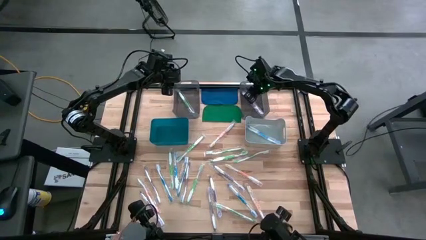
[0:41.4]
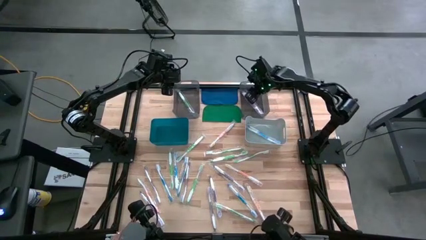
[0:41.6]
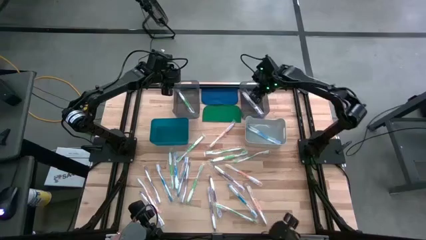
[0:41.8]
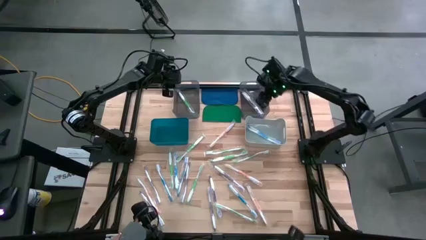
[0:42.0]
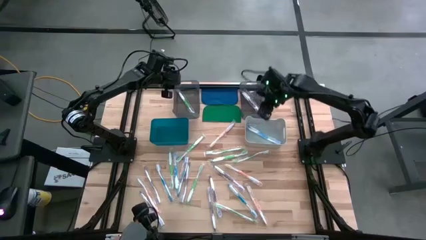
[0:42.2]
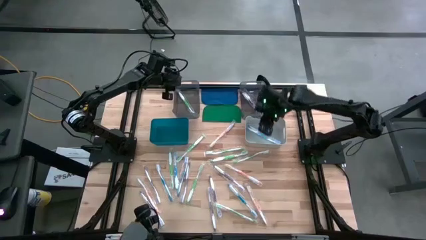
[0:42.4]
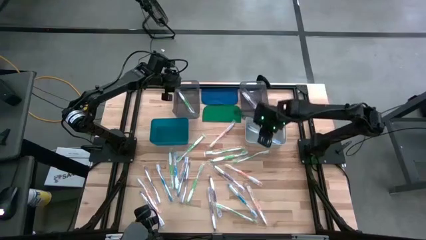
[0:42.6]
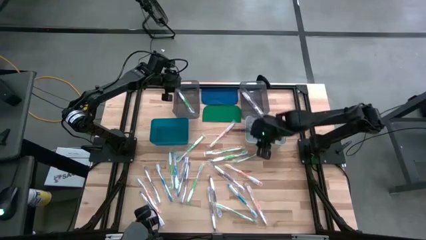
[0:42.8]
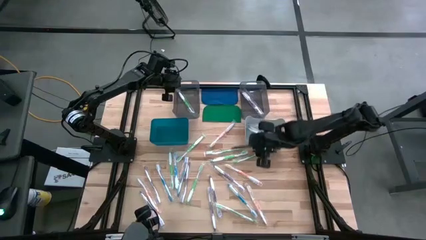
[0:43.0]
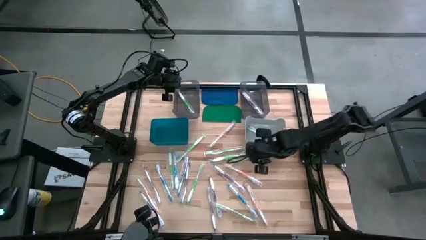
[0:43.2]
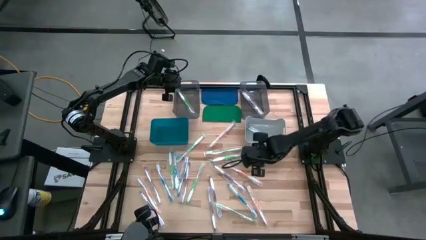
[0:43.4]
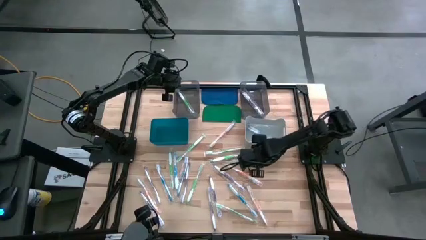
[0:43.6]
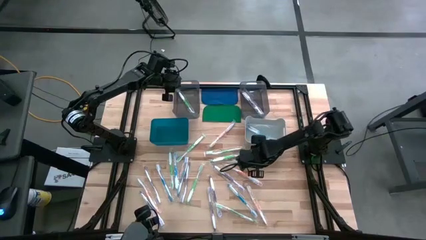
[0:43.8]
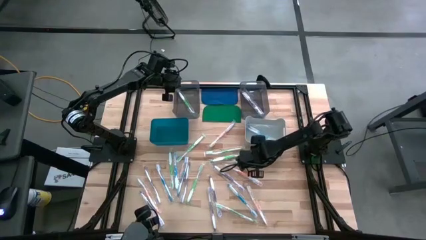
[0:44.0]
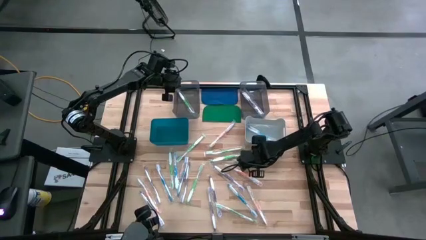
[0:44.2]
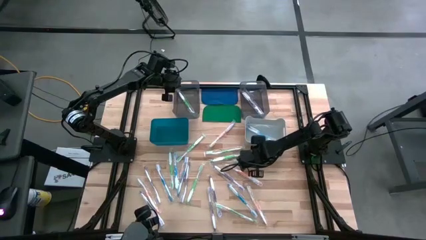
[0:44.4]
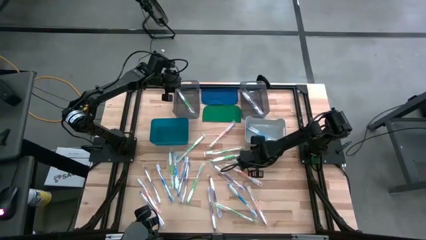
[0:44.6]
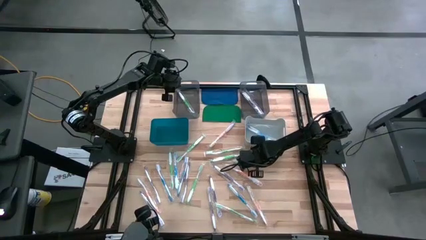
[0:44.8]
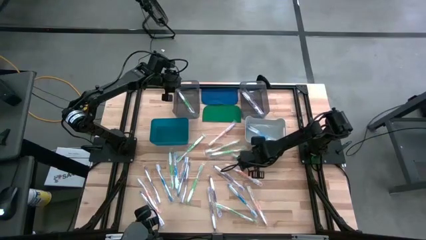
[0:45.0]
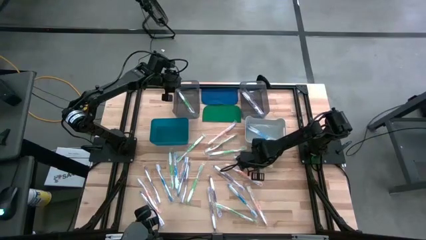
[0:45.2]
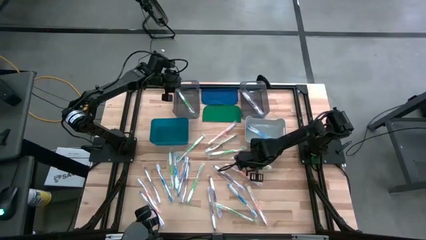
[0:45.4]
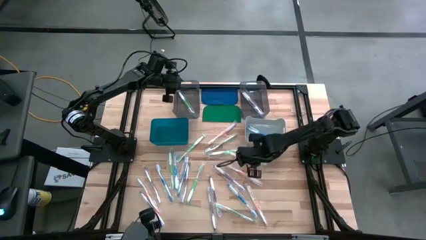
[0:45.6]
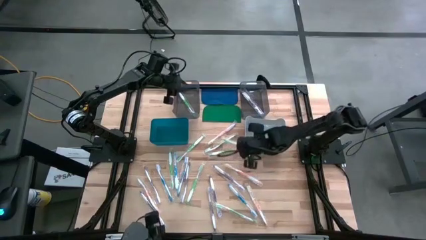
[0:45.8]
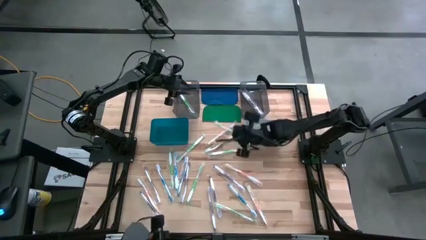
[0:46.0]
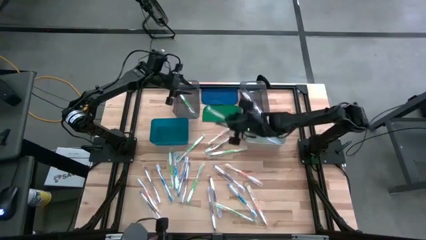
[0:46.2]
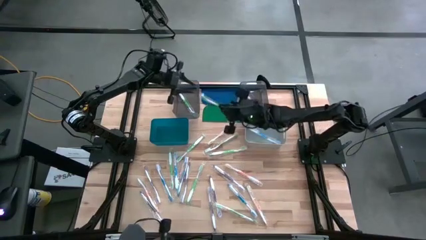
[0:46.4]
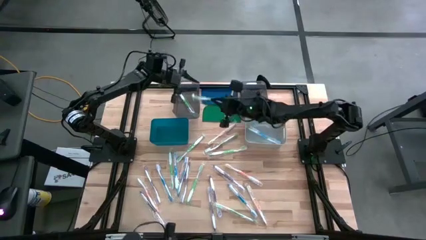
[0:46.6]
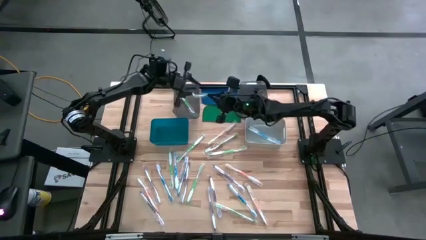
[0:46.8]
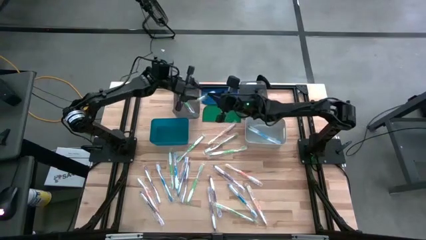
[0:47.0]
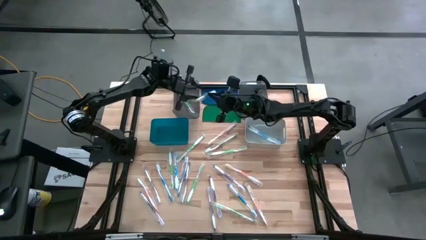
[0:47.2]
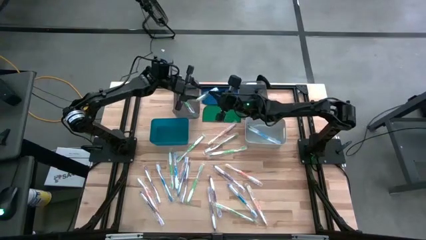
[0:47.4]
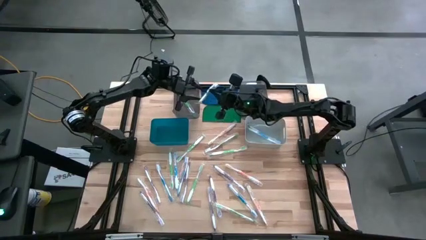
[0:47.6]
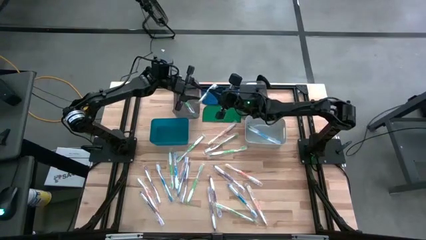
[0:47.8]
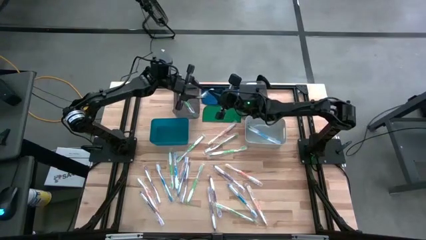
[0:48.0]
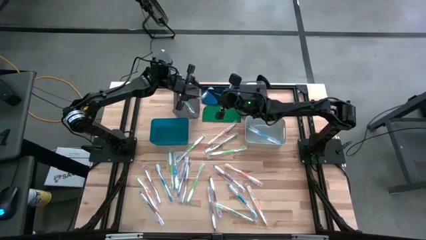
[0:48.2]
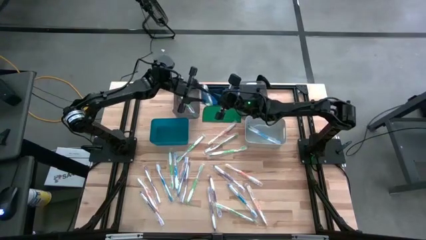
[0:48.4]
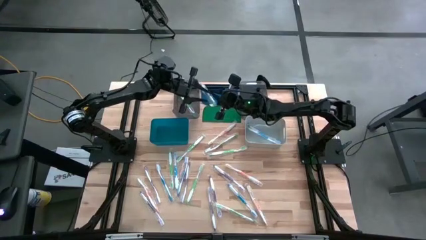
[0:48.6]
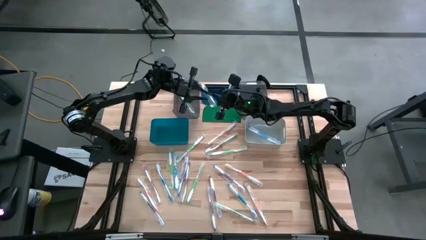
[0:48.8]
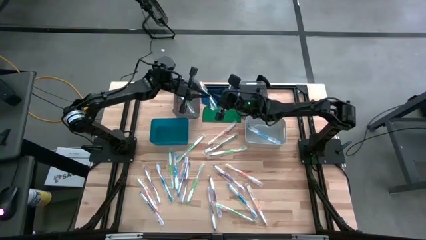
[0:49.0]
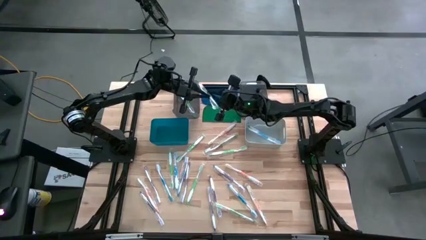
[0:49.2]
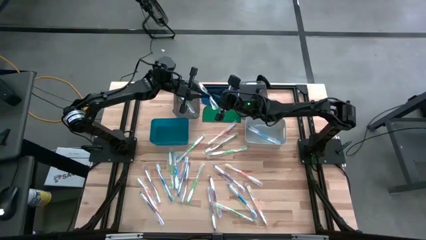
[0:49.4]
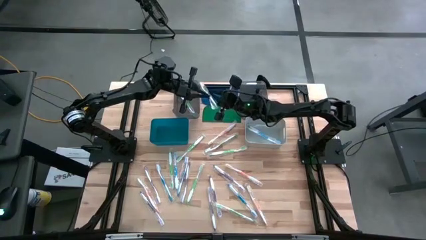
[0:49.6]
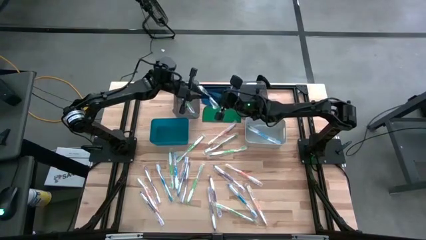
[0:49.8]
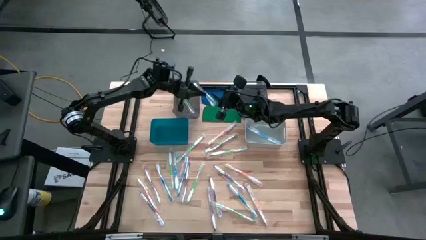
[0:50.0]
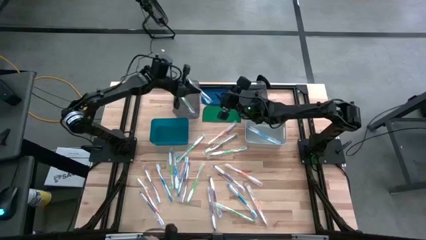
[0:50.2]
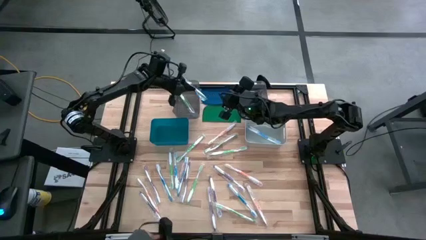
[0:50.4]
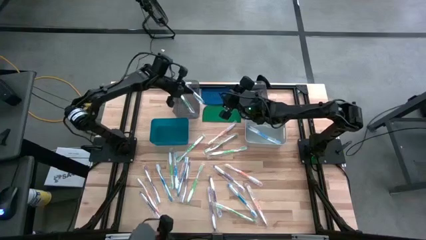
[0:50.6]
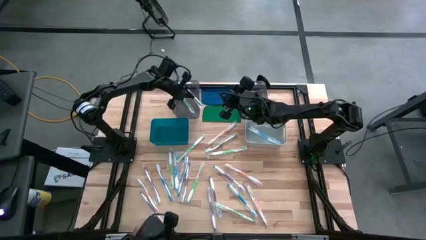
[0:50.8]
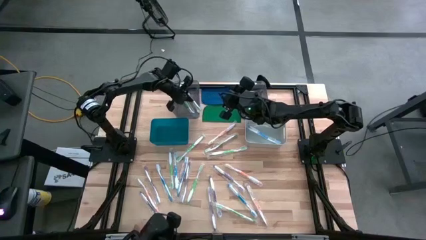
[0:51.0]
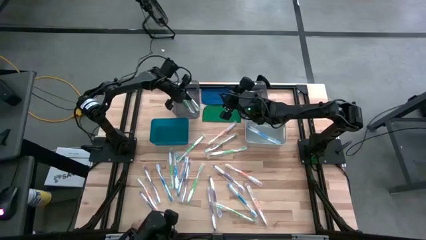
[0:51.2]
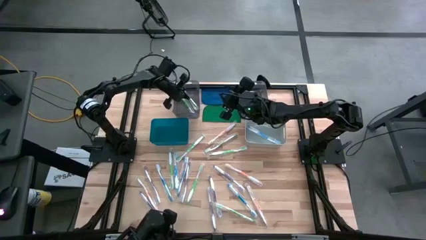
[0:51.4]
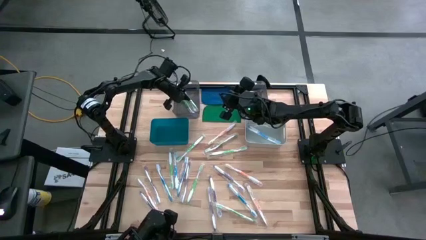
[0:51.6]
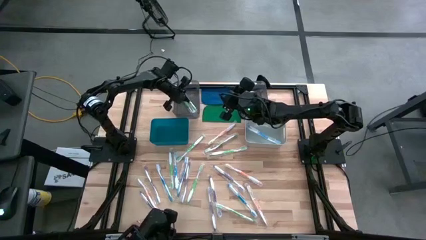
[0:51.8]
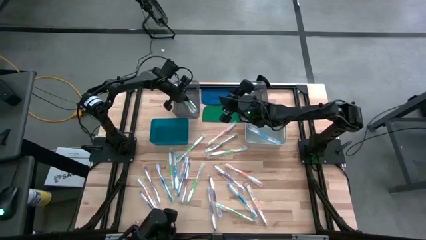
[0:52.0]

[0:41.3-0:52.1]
Task: Pick & Place Toothbrushes
Put the green toothbrush into the left black bin

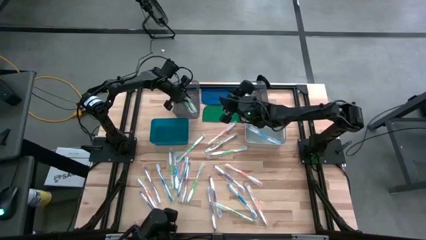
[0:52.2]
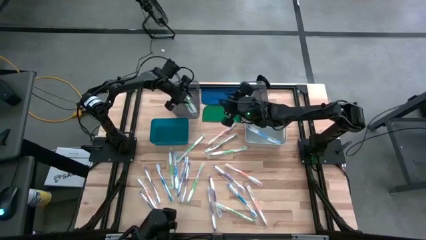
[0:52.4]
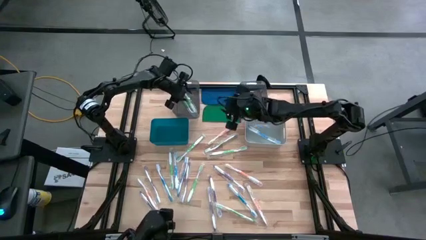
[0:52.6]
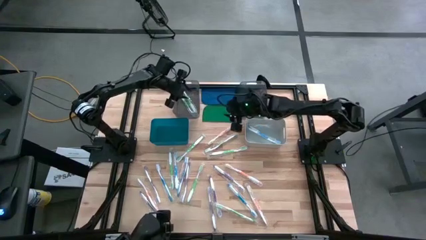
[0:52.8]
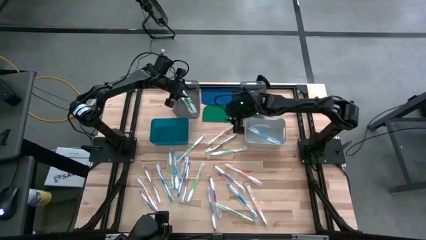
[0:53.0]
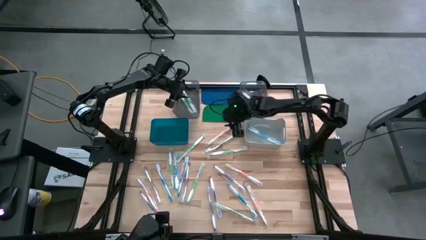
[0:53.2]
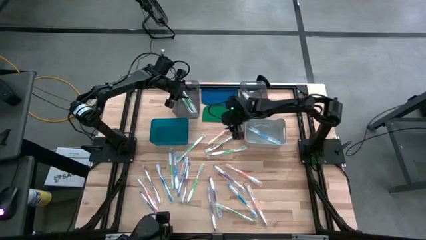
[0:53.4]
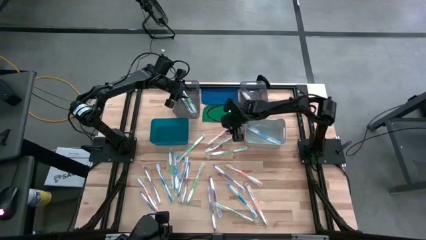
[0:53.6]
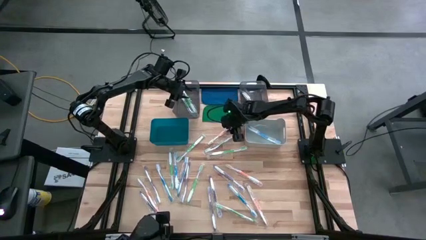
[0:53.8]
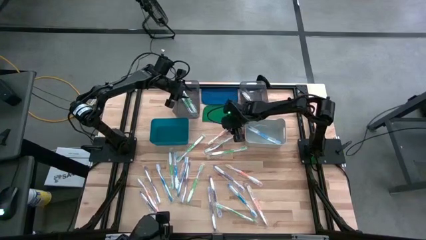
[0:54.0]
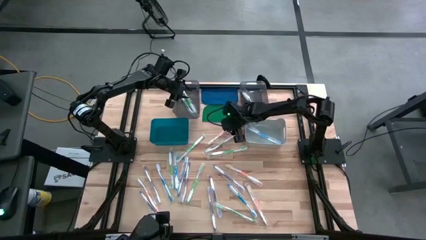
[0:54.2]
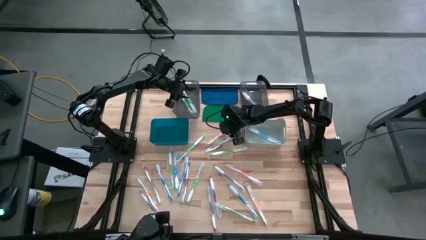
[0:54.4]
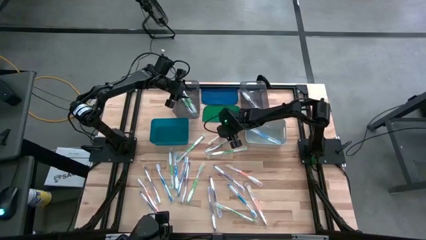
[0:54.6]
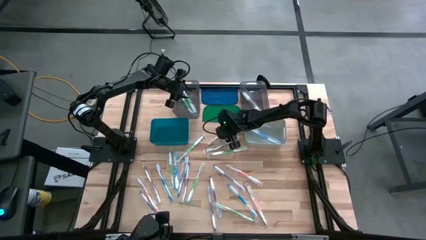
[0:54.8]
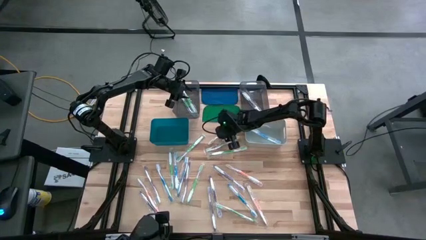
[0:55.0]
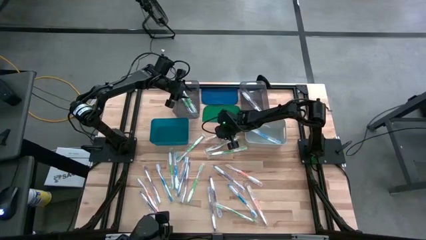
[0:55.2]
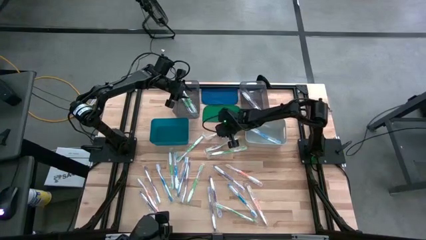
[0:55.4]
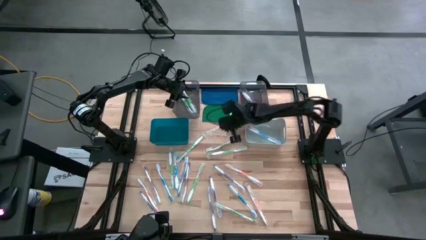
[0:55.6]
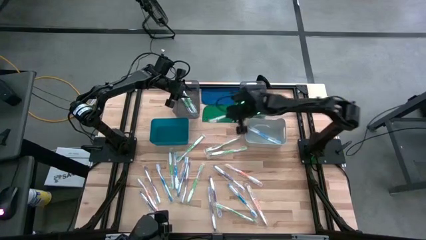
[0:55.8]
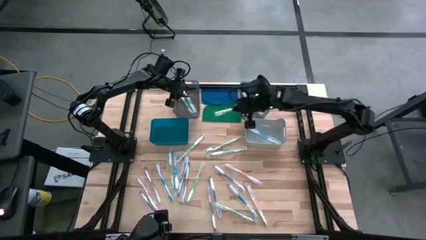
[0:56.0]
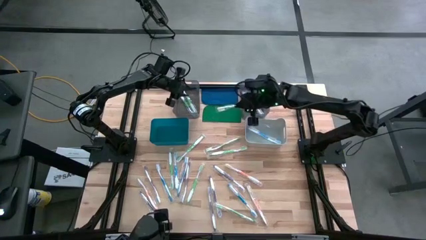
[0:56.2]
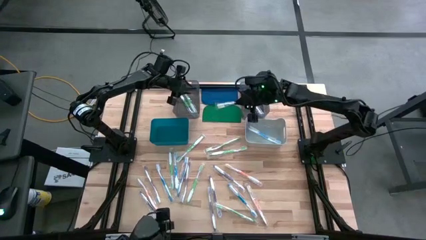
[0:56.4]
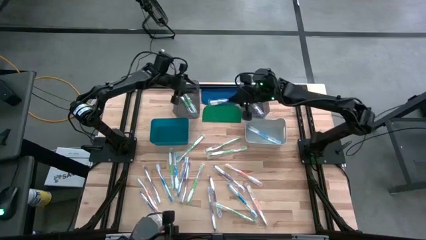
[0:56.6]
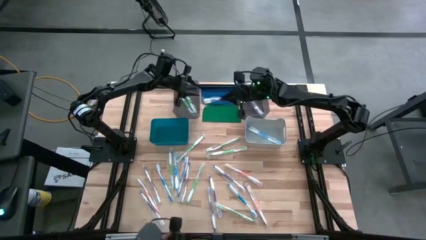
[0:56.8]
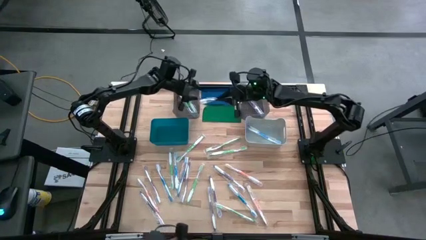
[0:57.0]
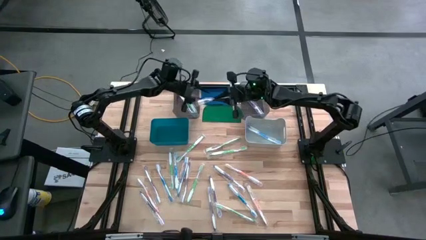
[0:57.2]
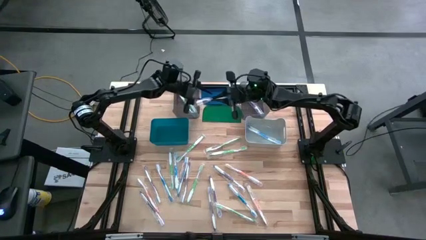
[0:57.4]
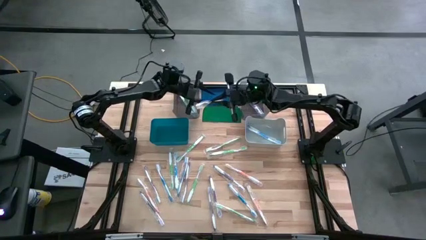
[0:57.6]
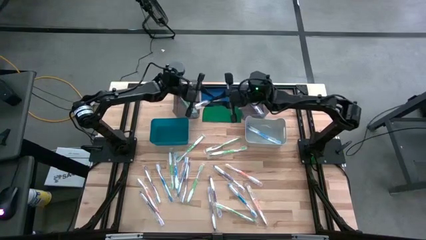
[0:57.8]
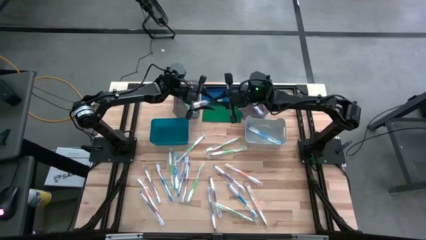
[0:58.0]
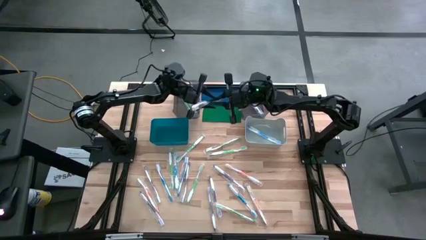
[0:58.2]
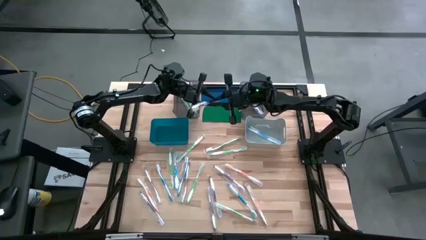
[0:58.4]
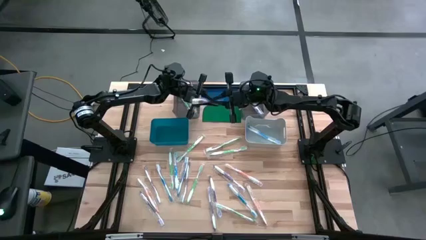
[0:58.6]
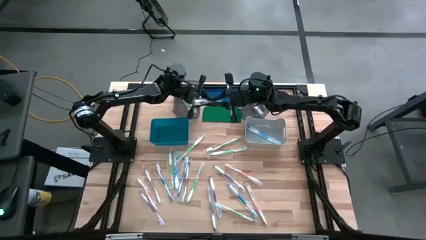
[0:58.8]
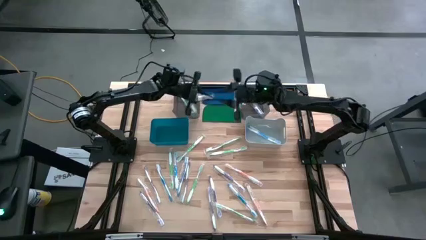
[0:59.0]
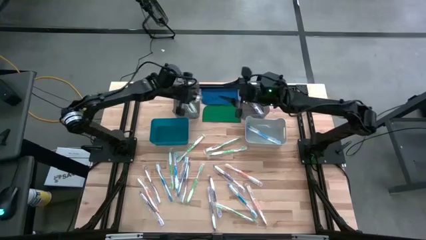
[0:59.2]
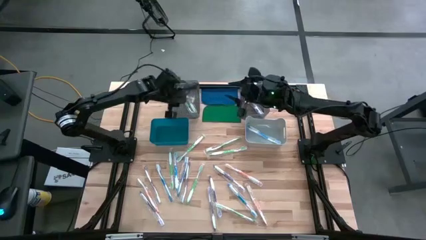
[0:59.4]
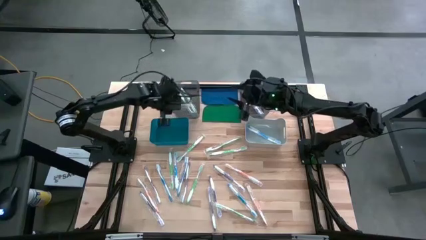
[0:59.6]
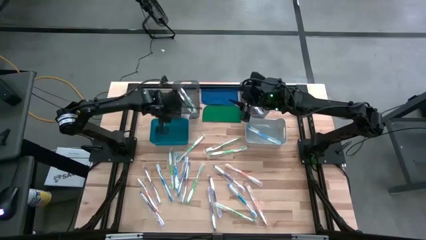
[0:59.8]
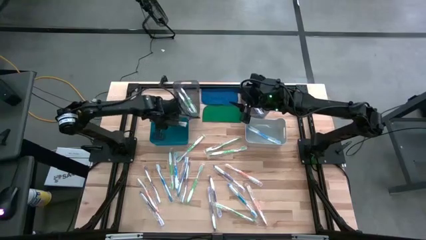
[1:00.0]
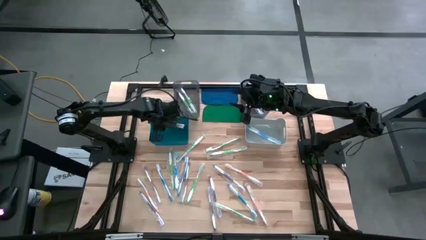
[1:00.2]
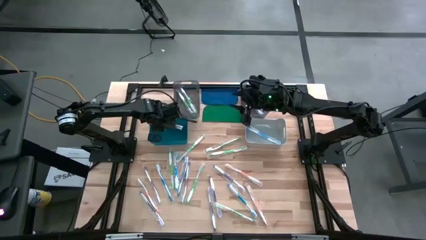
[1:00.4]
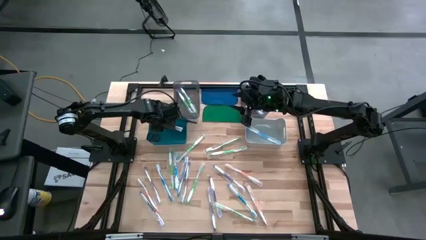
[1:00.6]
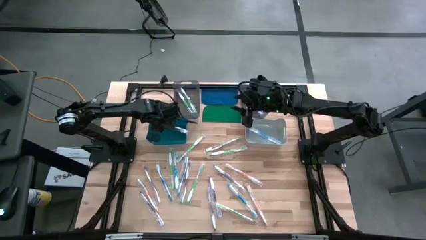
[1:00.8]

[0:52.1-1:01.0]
Put the orange toothbrush into the blue bin
